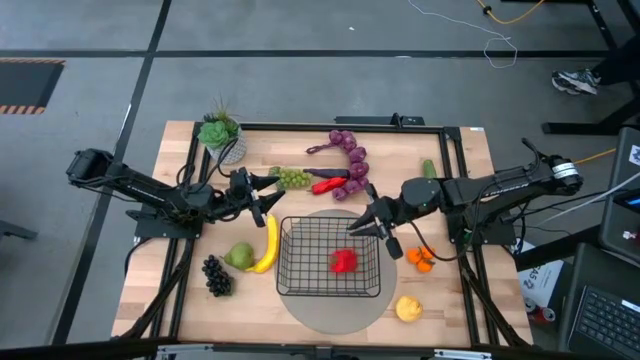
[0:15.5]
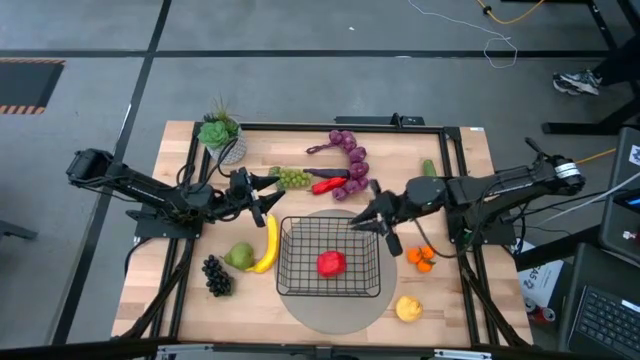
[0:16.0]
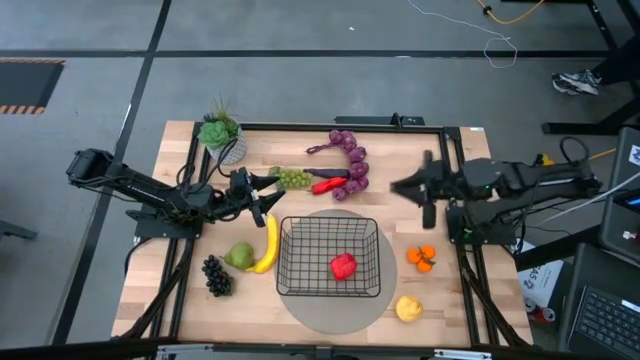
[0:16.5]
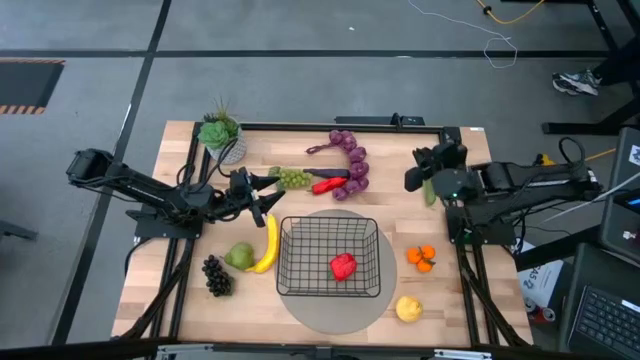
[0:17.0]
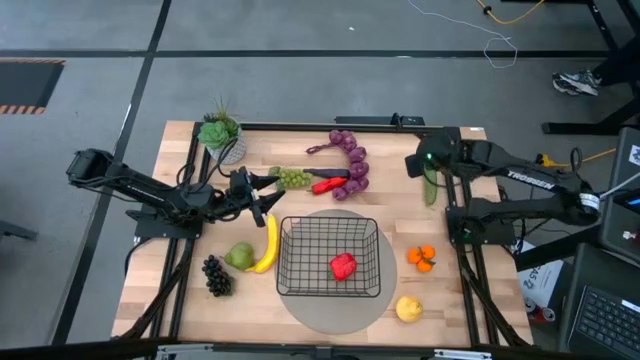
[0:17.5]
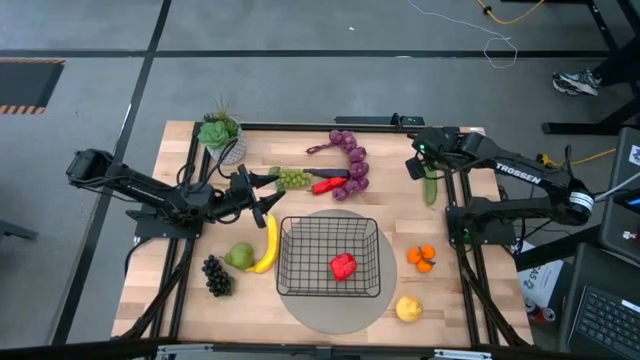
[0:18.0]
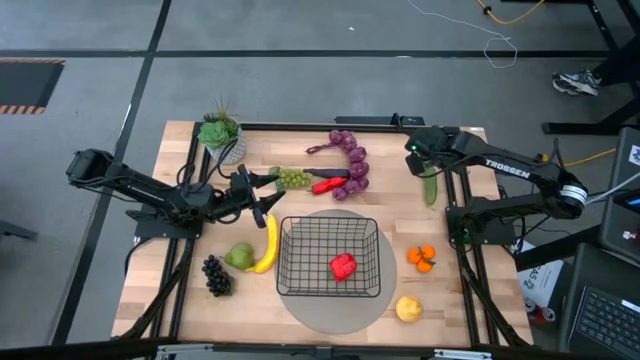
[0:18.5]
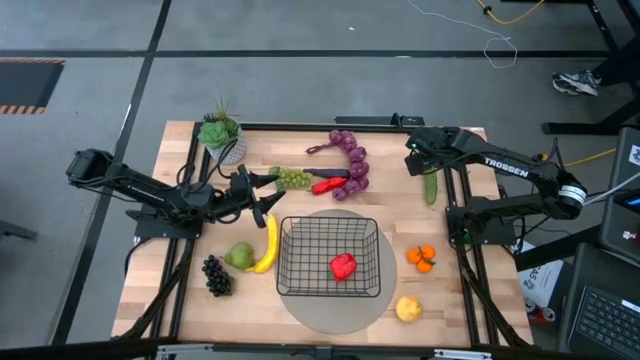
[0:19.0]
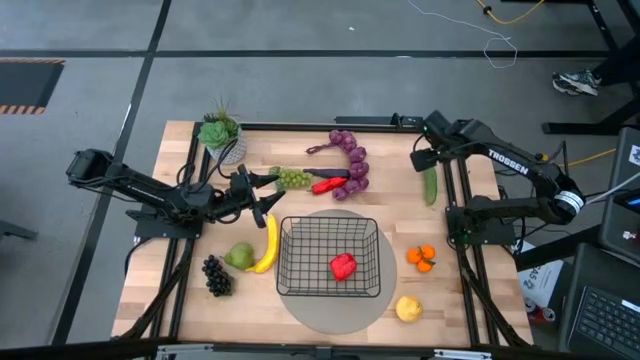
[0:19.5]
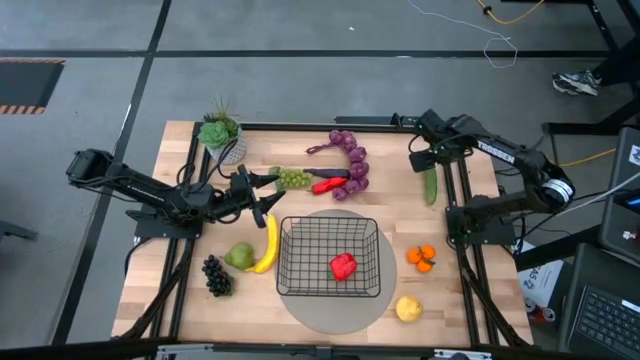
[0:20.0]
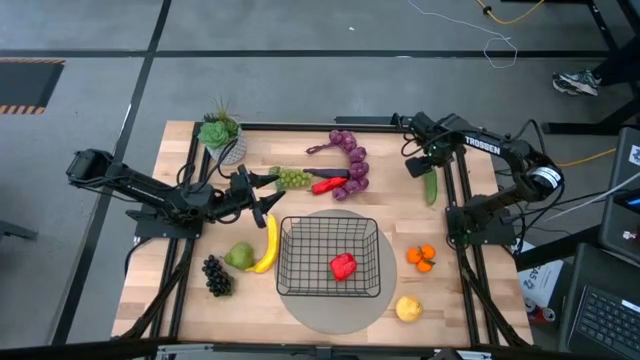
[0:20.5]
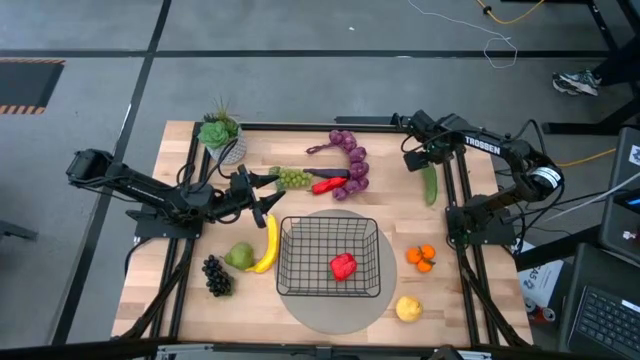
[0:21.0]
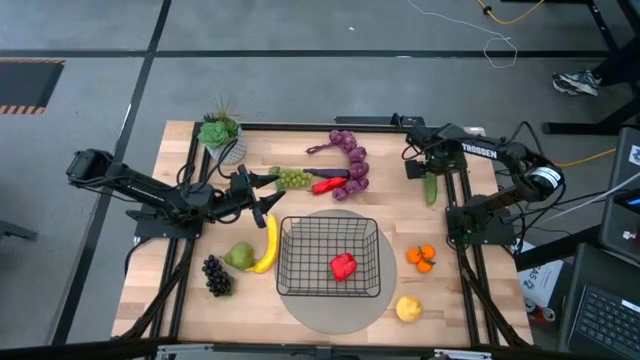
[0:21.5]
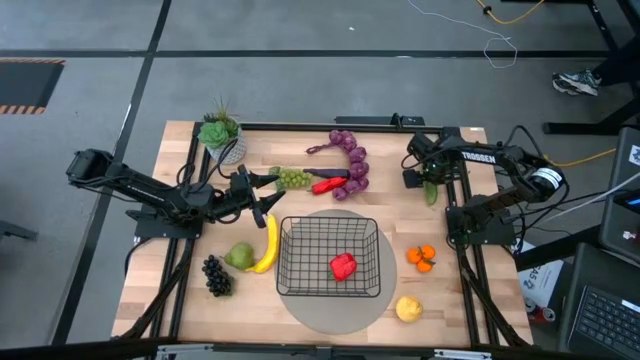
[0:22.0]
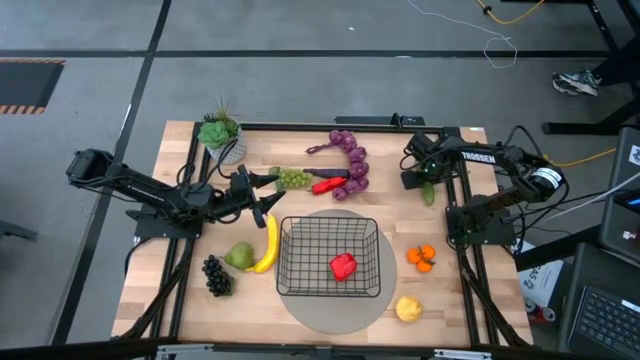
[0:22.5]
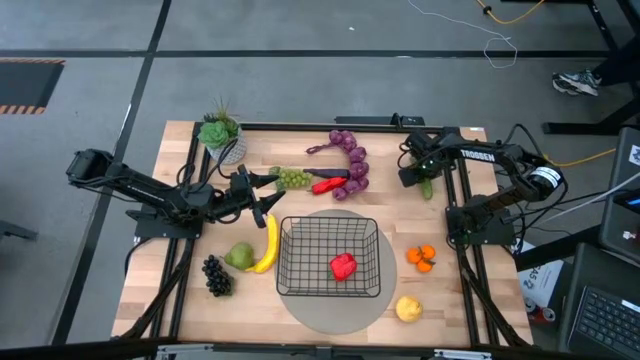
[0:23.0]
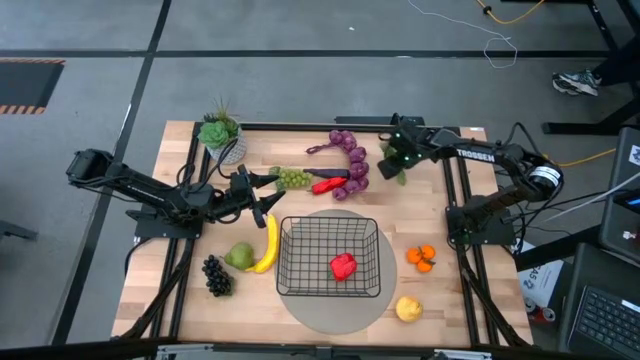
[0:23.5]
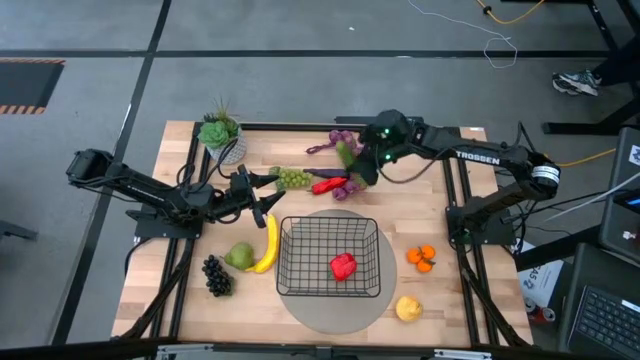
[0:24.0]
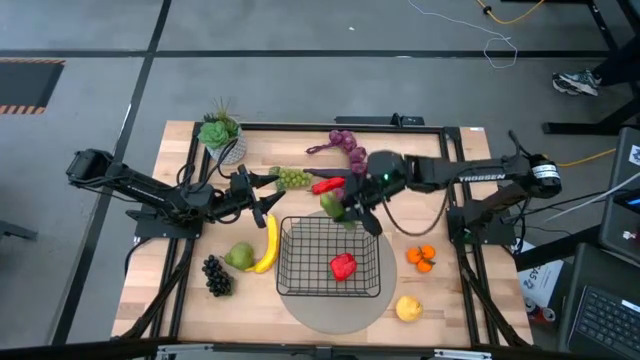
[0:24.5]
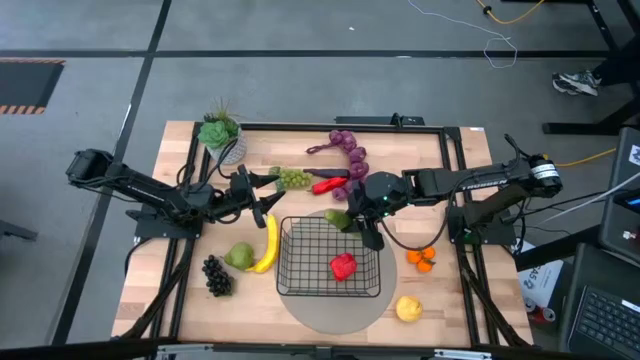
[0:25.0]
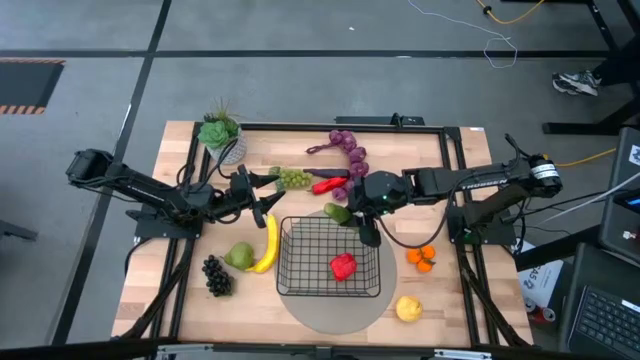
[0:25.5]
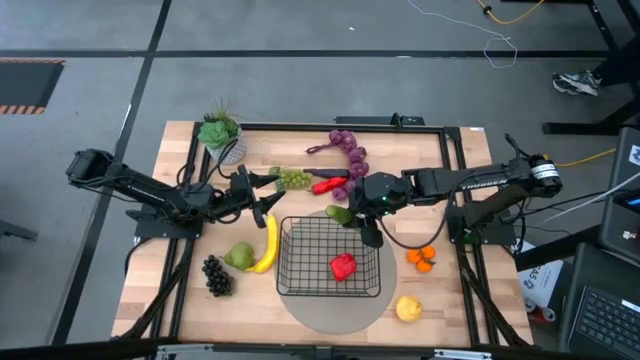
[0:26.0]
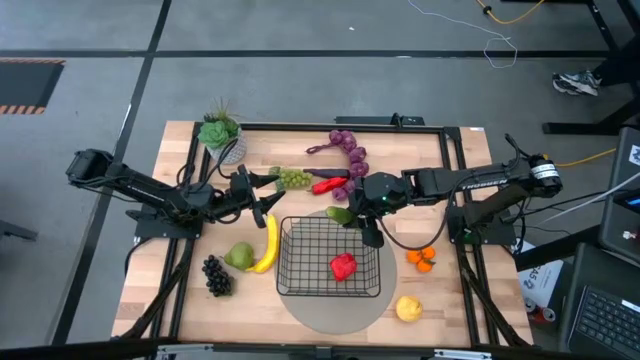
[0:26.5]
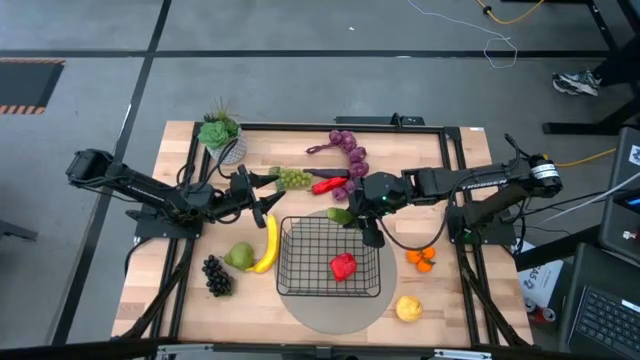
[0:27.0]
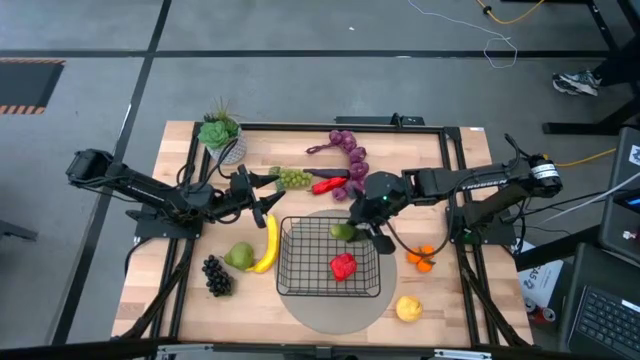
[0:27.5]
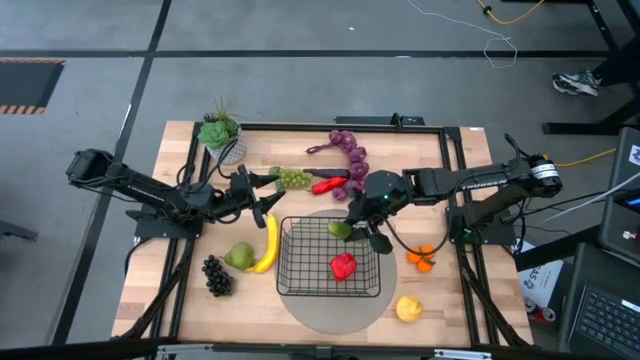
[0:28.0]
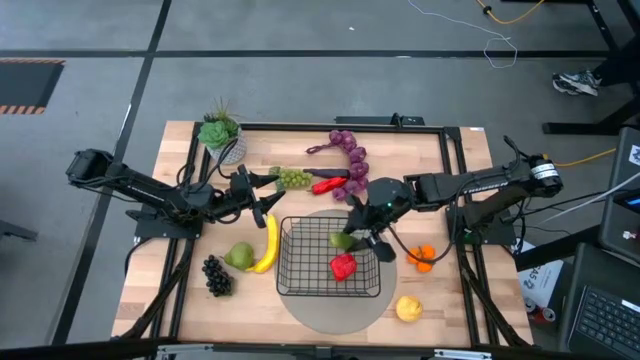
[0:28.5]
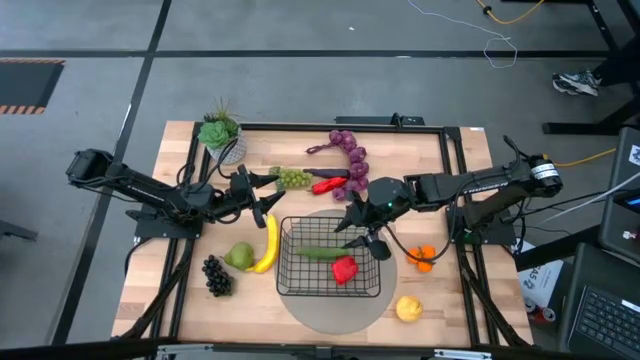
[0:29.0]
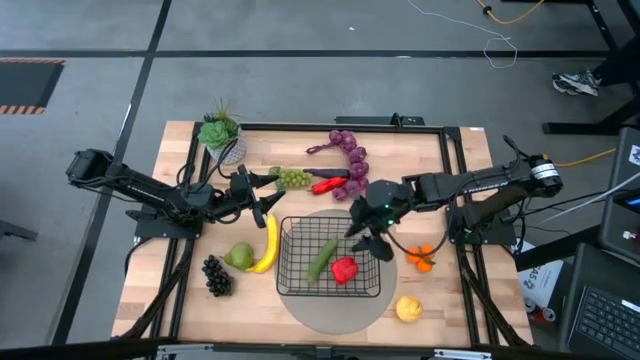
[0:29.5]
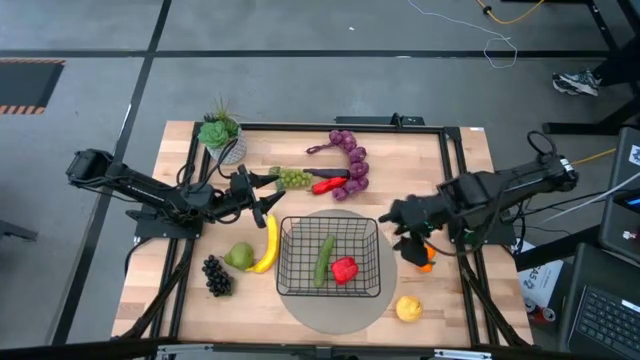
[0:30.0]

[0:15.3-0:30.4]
Task: Build produce basket
Put the green cucumber into the wire basket

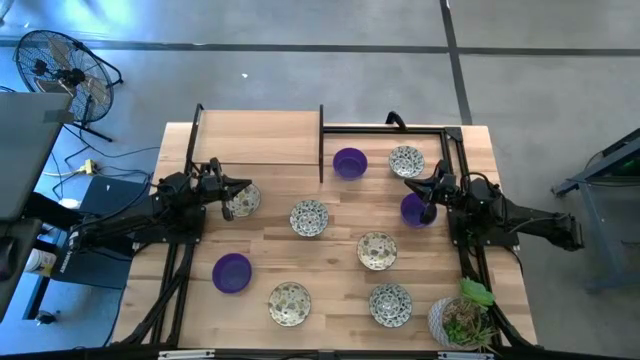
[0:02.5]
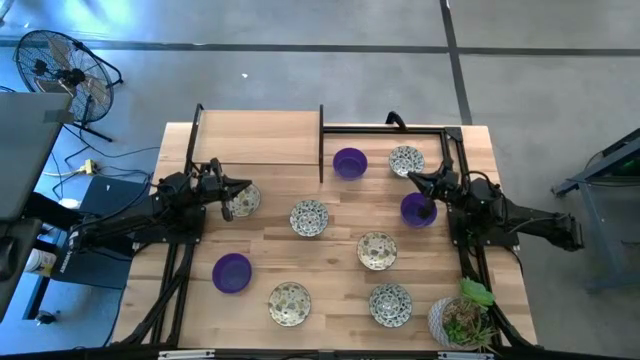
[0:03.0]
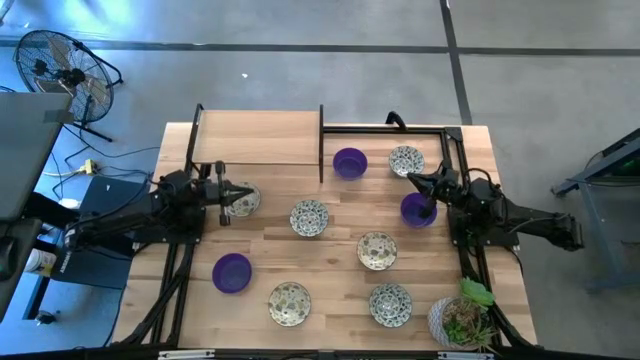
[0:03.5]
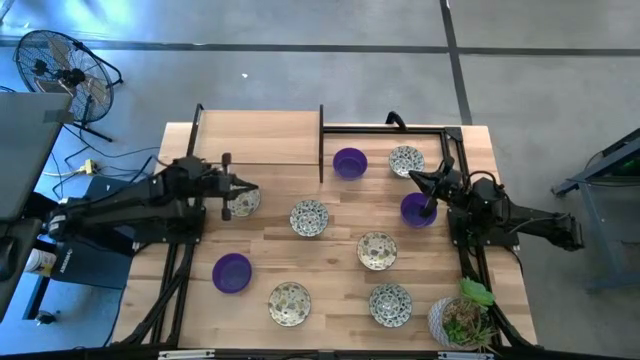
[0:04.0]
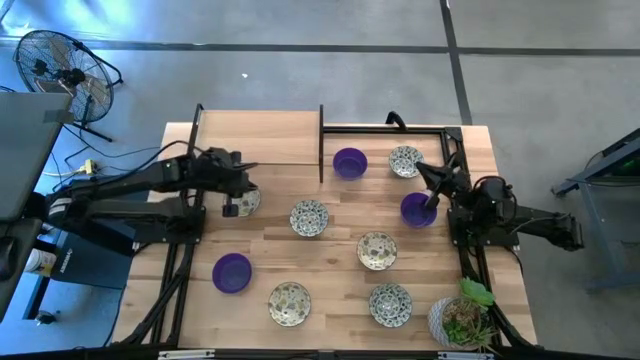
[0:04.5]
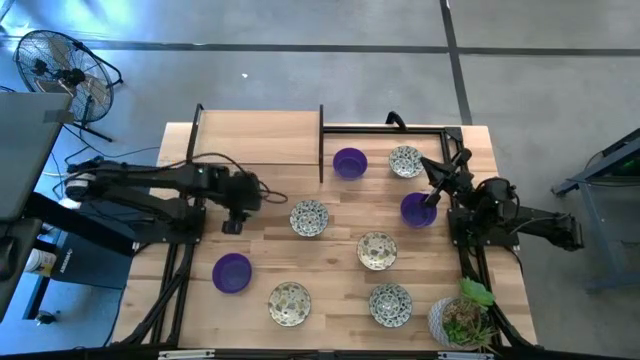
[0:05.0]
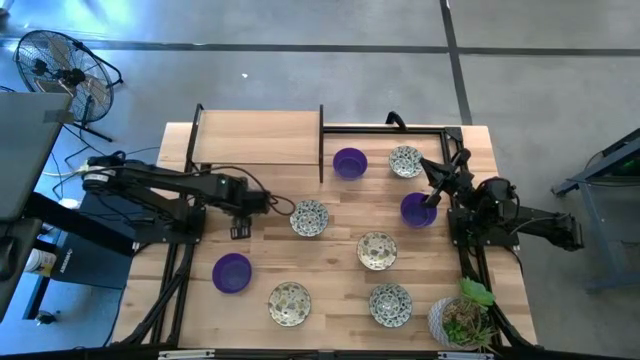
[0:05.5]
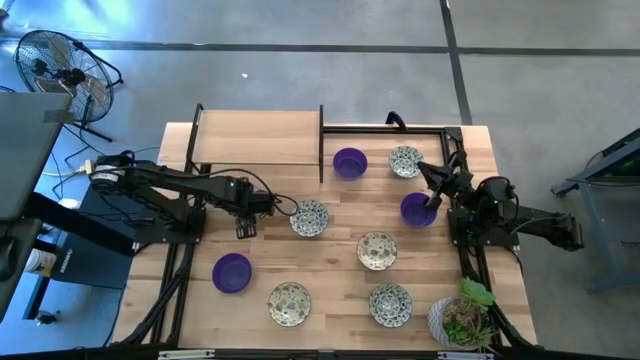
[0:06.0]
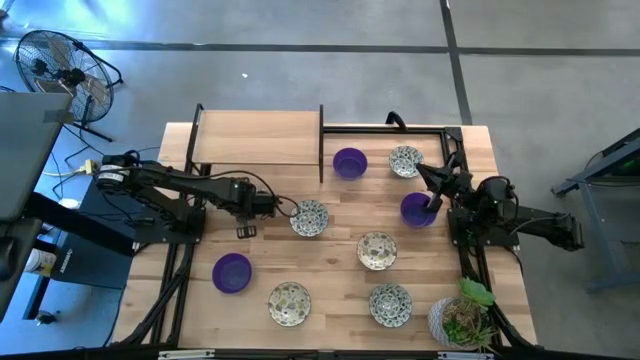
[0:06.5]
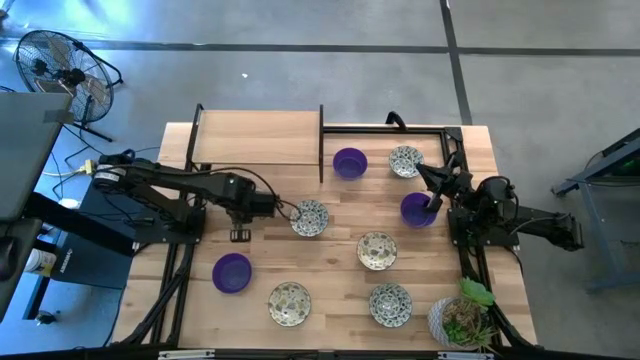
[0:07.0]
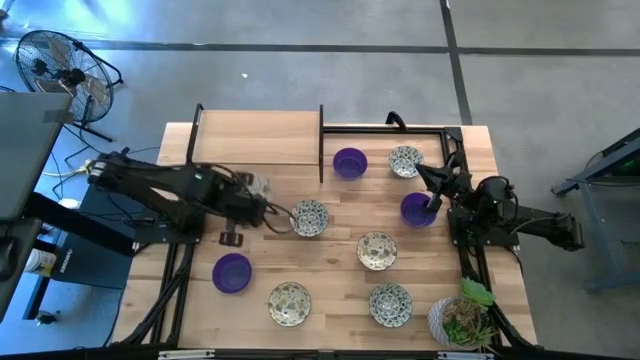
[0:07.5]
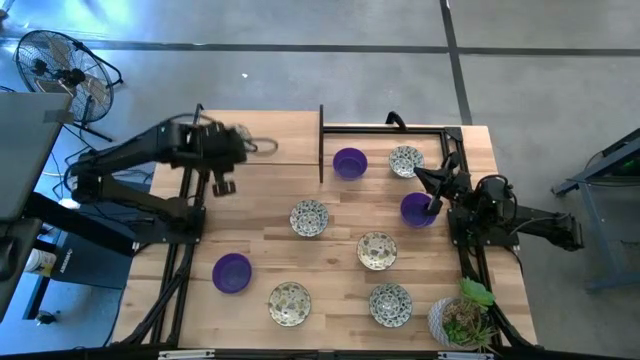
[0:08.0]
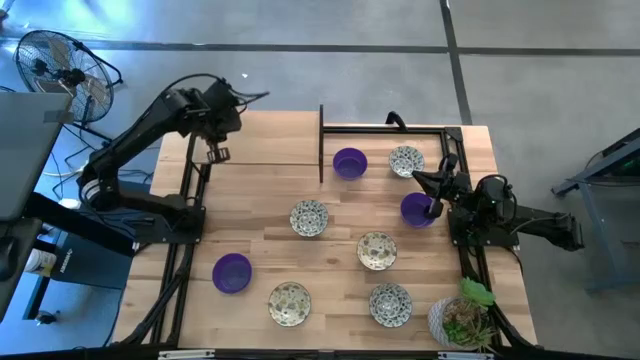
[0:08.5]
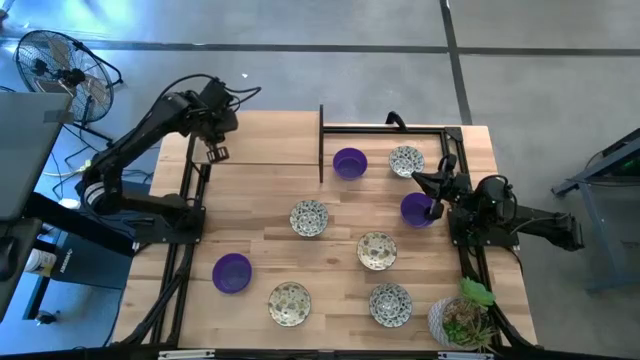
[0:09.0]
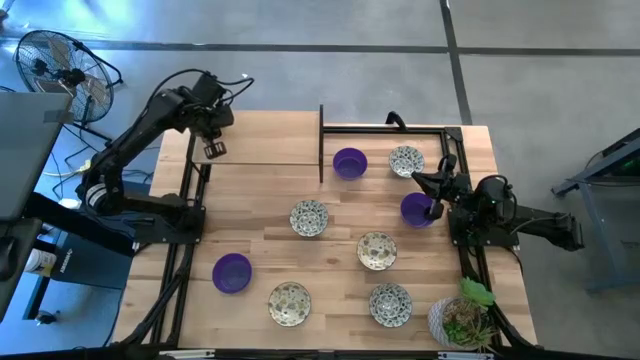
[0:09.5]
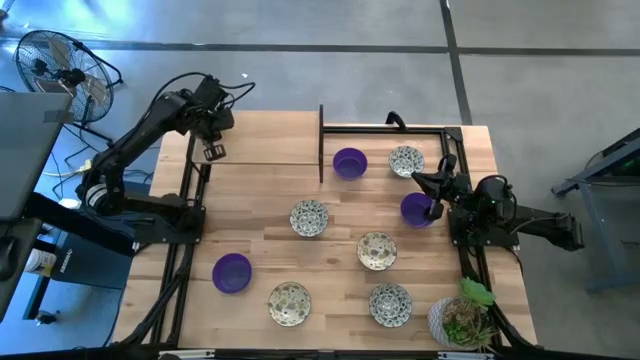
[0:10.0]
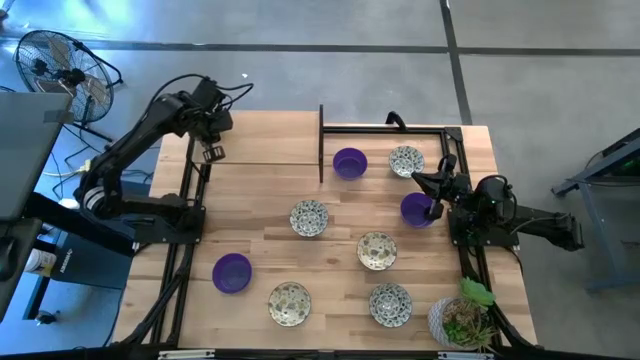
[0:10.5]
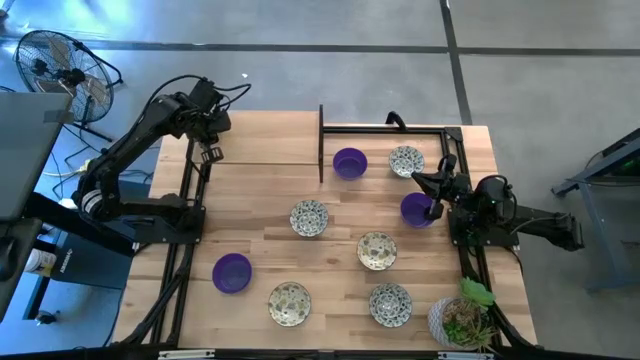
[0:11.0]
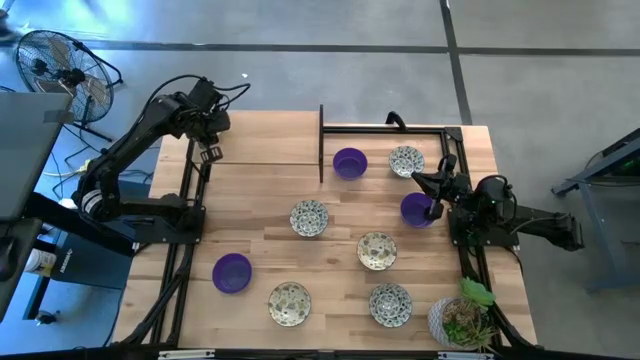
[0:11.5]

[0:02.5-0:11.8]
Task: Pick & Place Mini bowls
Put the top yellow and white patterned bowl on the shelf
